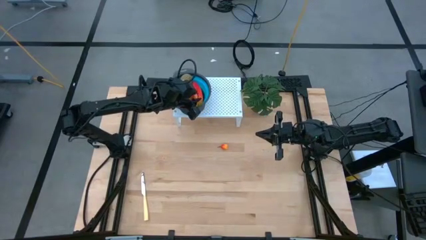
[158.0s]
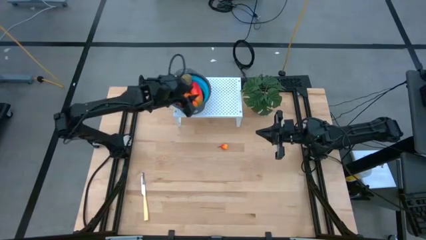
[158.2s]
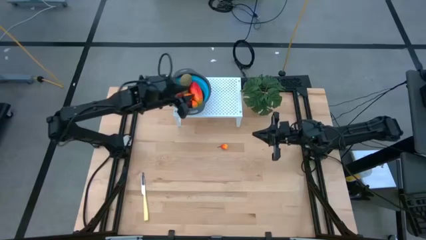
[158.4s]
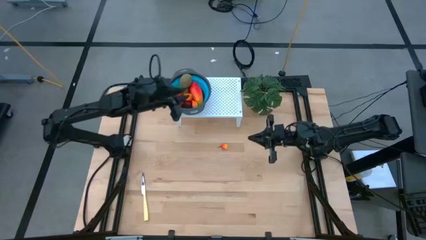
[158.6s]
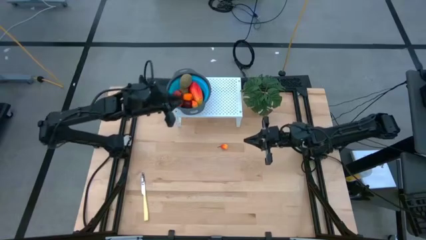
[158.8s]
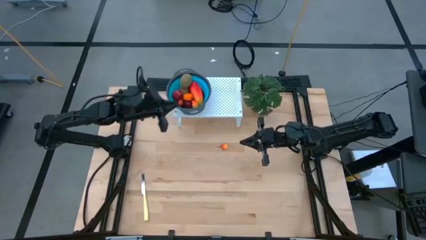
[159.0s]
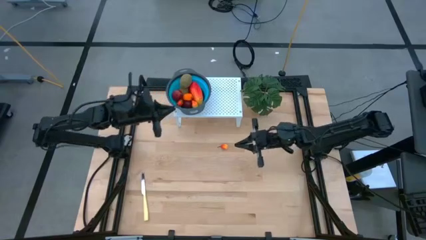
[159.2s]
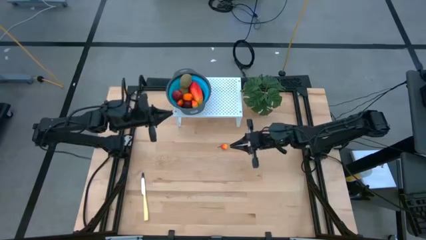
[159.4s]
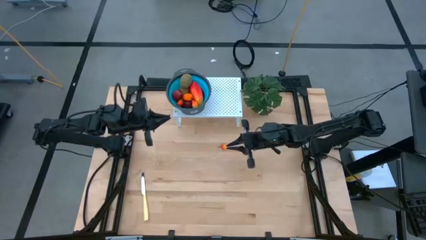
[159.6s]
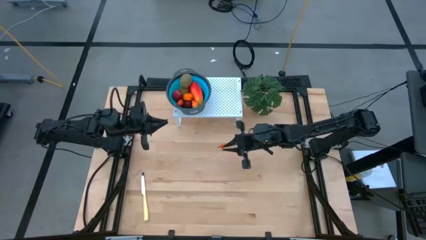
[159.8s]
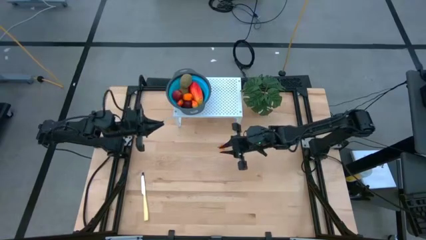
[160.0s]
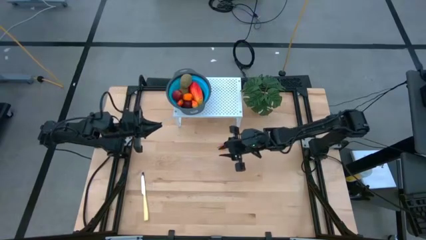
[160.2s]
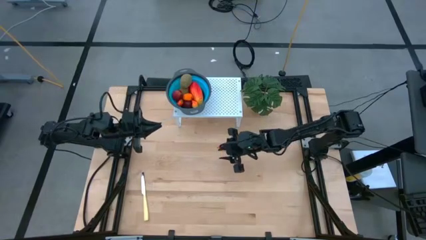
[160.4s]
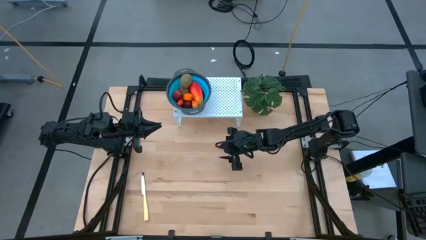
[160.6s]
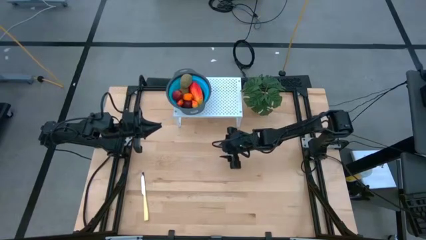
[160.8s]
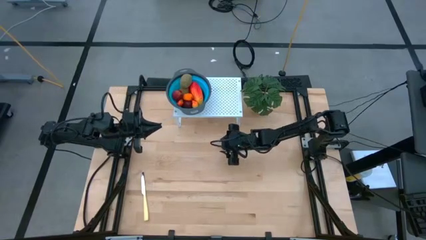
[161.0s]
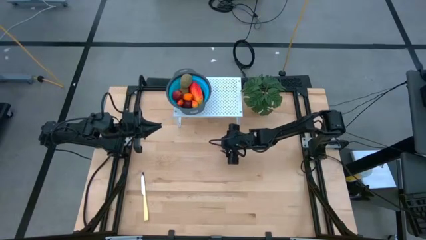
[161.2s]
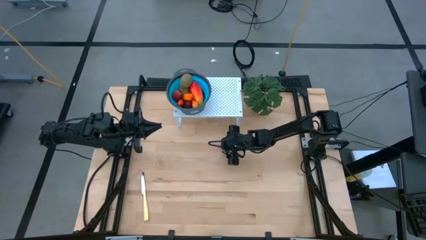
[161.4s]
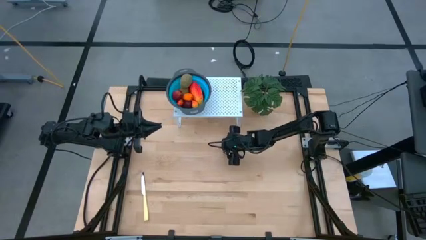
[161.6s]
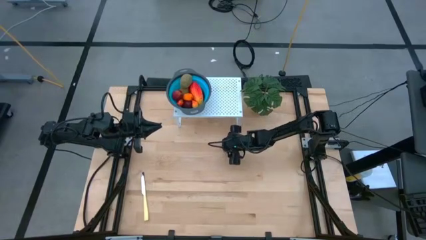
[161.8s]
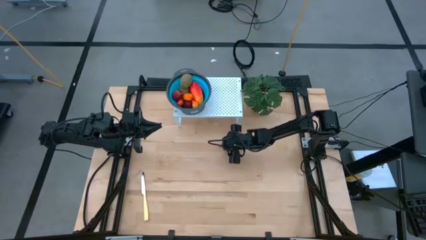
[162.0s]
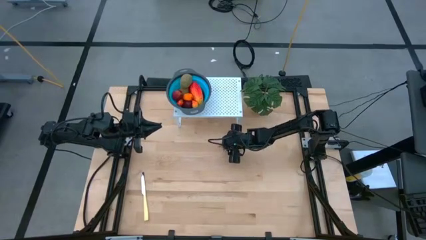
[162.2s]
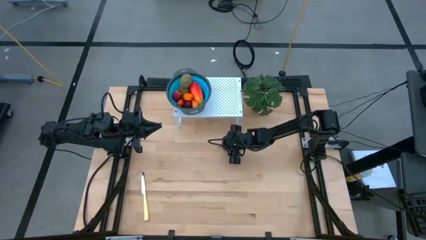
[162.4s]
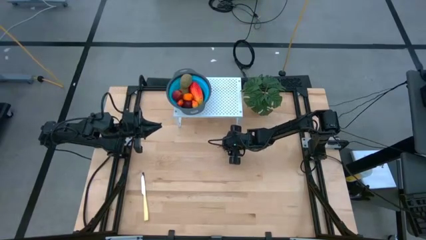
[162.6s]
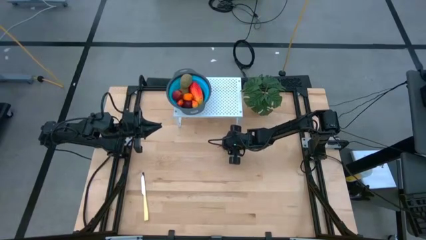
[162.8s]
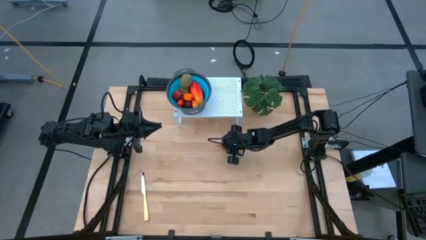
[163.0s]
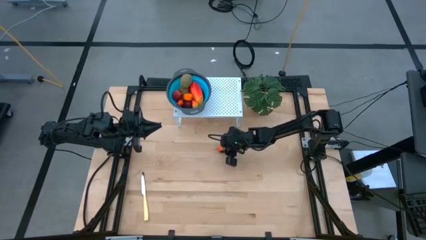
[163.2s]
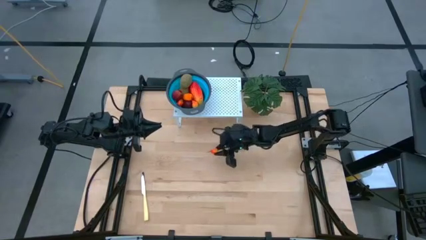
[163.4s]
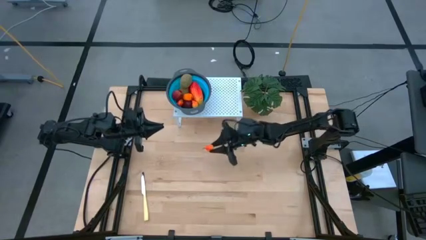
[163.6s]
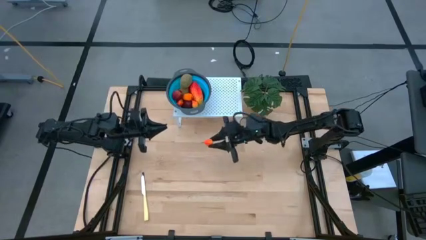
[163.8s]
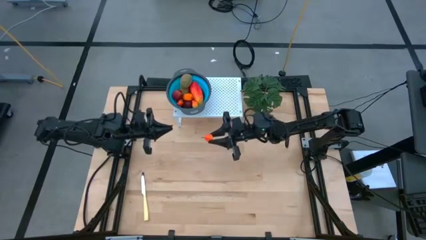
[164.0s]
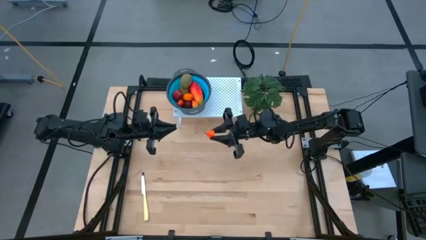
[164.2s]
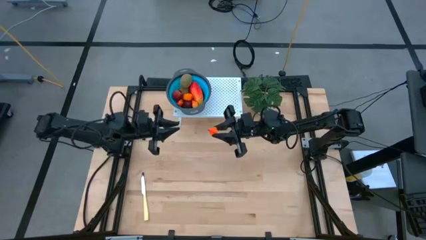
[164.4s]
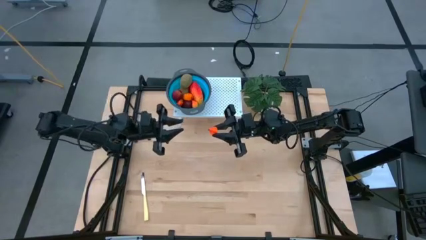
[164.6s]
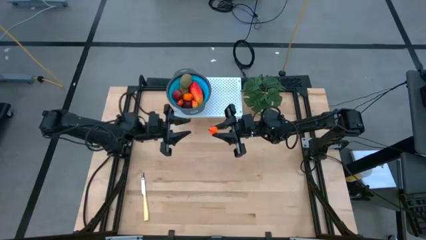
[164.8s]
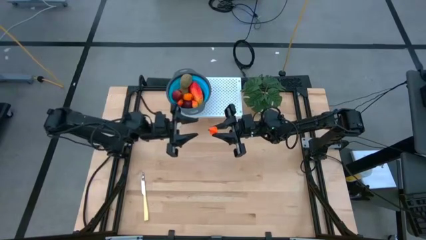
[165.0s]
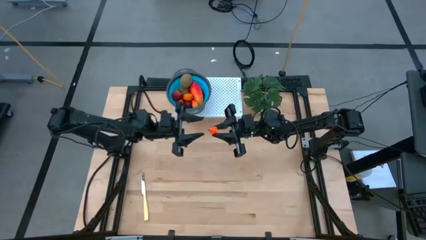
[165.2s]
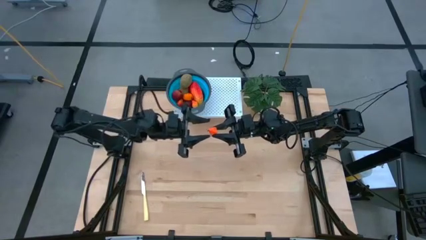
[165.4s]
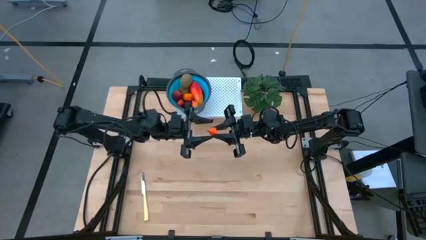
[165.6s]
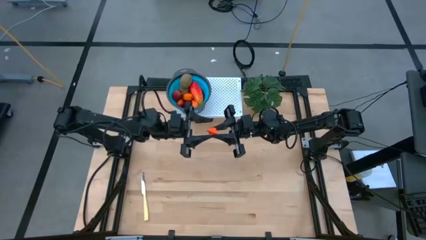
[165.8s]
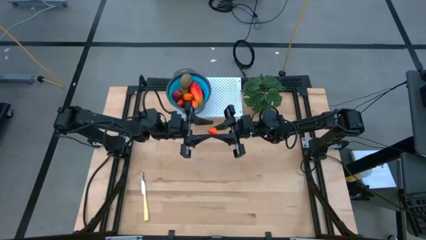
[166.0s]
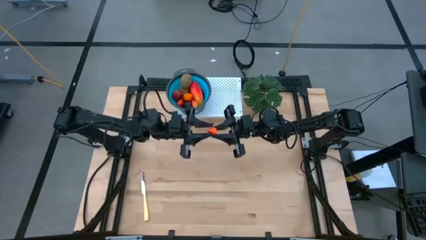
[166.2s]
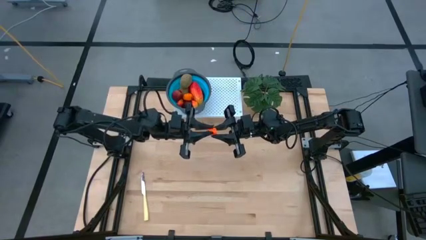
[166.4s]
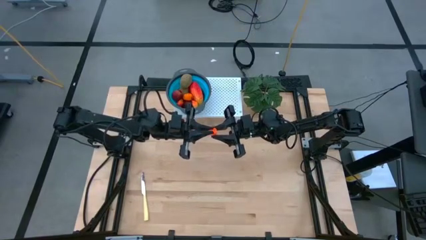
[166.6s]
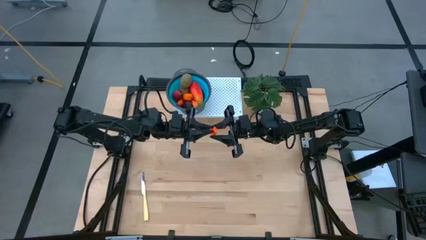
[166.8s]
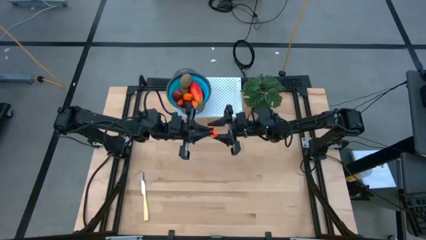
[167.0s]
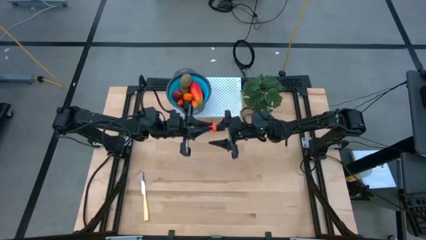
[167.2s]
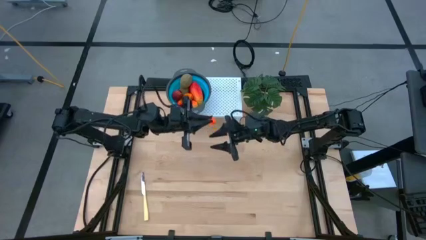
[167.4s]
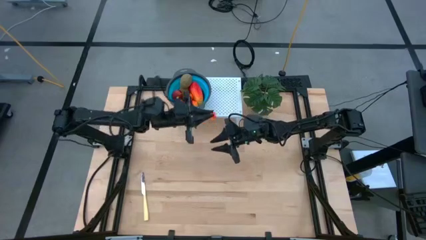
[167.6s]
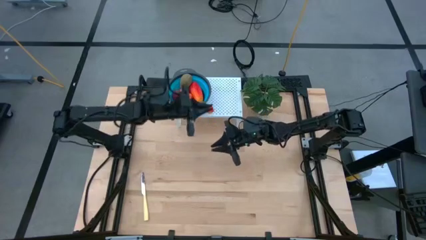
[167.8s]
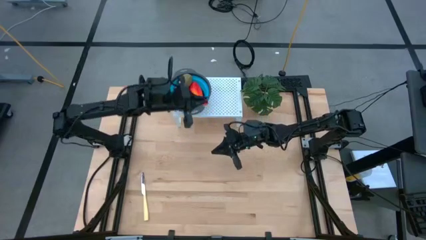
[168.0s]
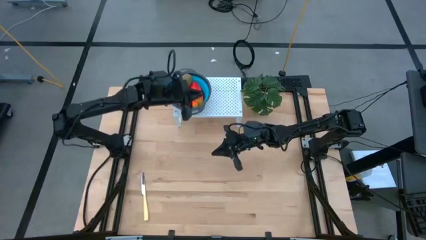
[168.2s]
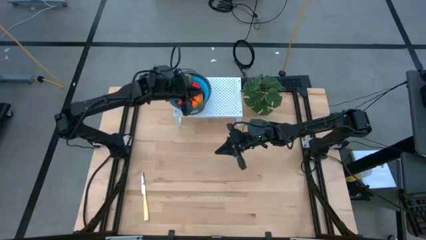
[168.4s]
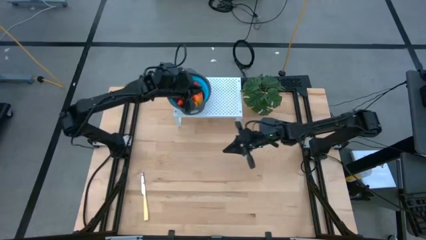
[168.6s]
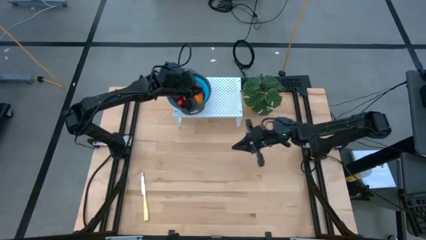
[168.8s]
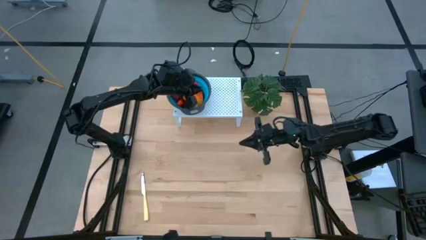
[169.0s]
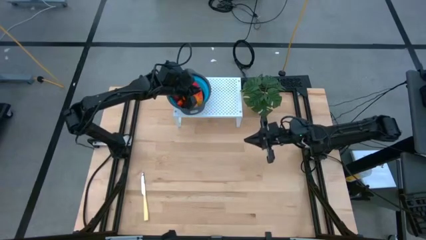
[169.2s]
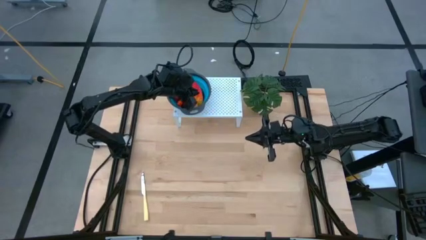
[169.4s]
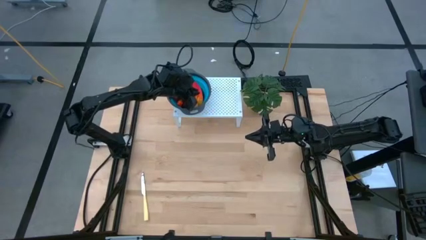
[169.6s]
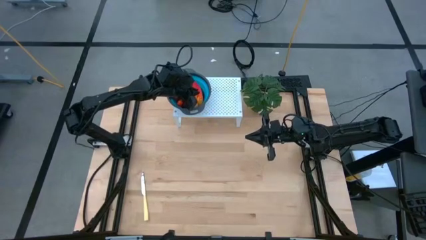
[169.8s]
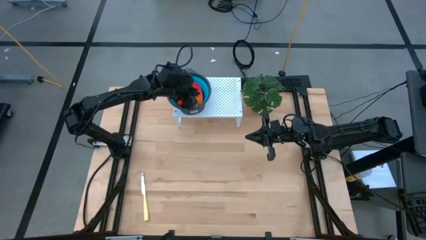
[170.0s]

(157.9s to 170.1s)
Task: Pick & Place Fruit
Put the peach in the blue strainer bowl on the shelf

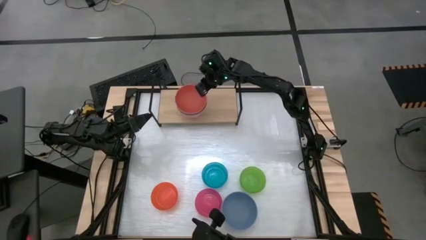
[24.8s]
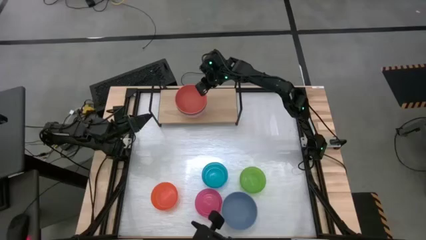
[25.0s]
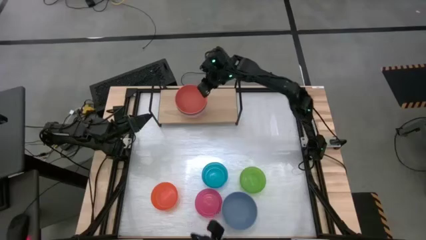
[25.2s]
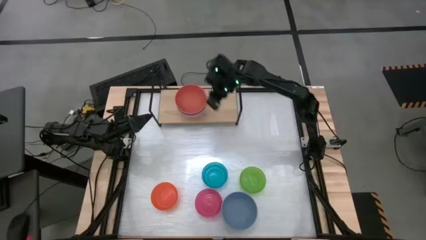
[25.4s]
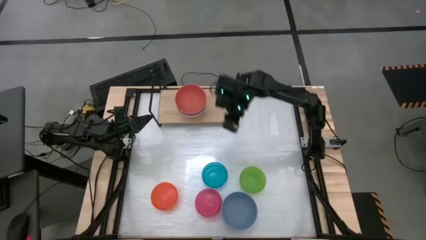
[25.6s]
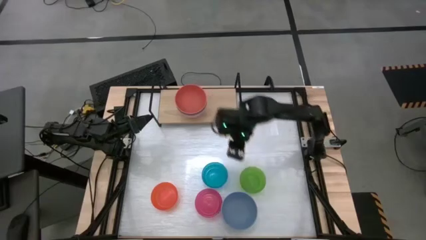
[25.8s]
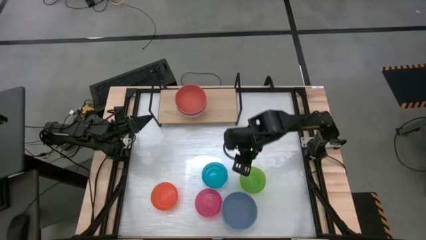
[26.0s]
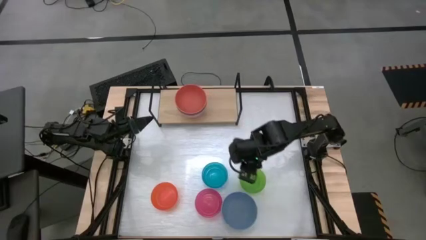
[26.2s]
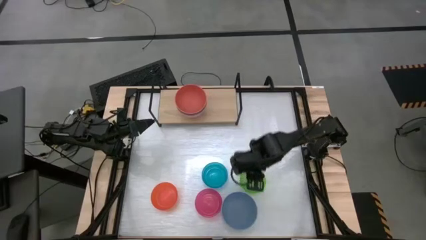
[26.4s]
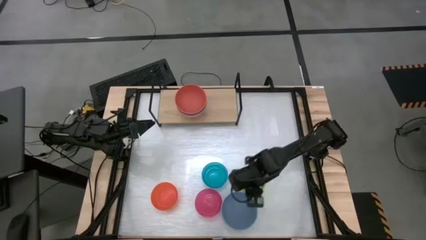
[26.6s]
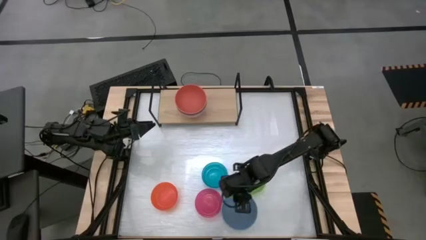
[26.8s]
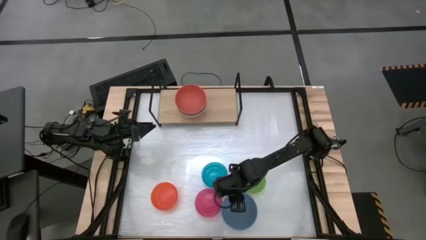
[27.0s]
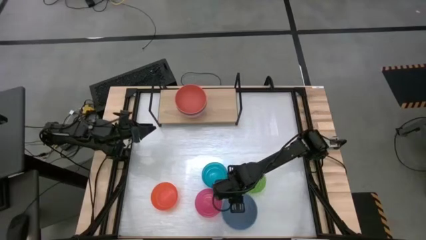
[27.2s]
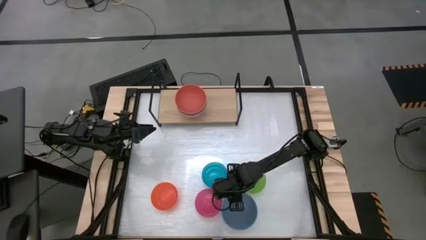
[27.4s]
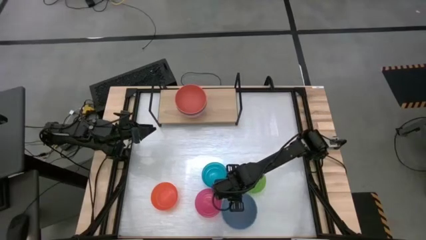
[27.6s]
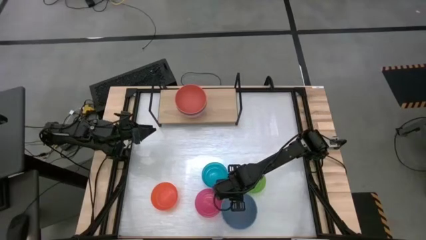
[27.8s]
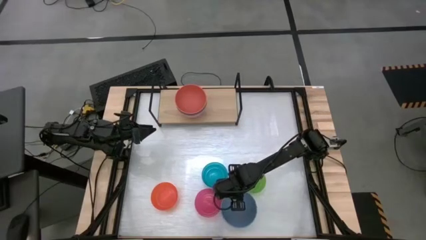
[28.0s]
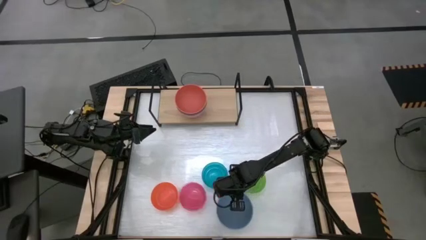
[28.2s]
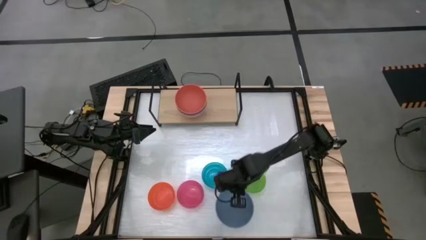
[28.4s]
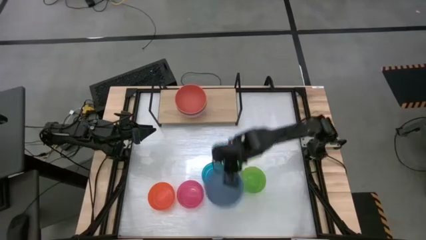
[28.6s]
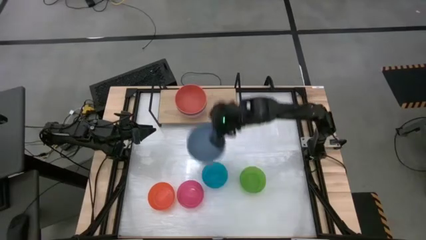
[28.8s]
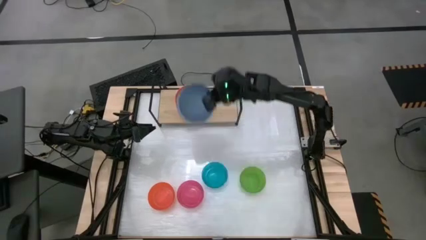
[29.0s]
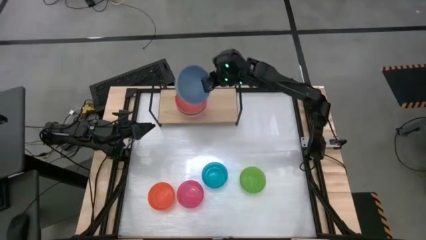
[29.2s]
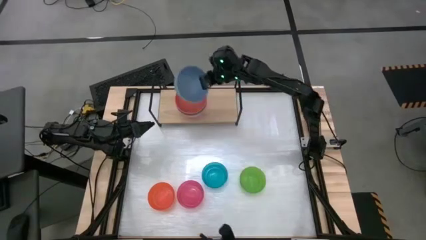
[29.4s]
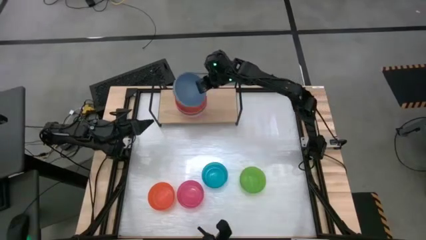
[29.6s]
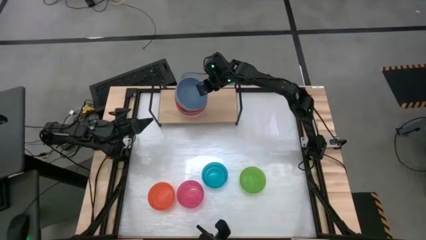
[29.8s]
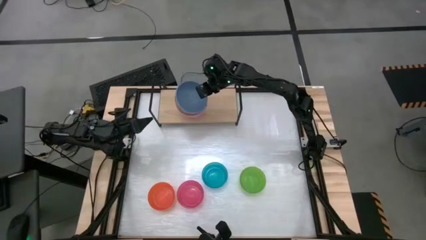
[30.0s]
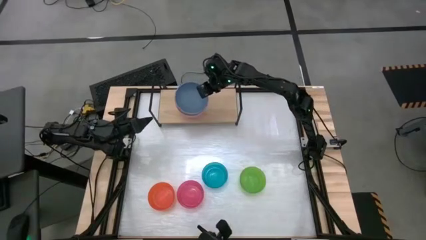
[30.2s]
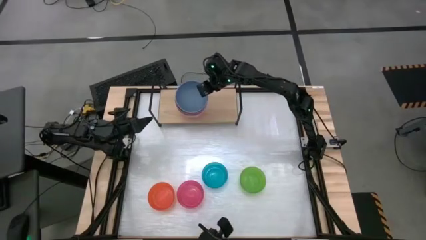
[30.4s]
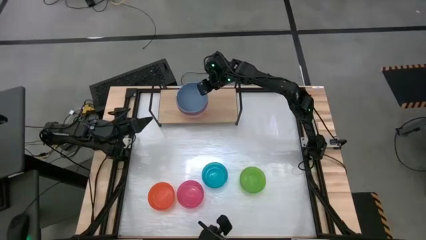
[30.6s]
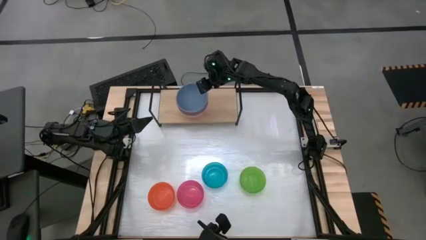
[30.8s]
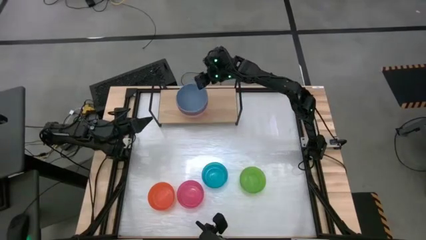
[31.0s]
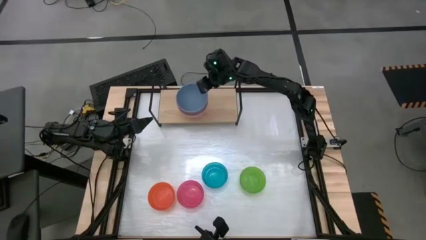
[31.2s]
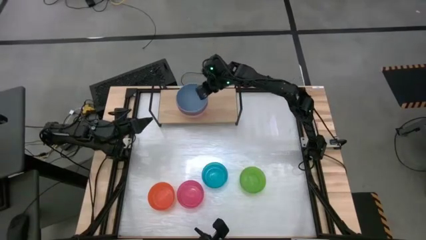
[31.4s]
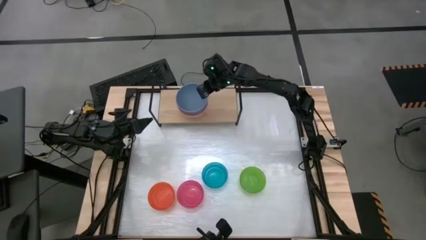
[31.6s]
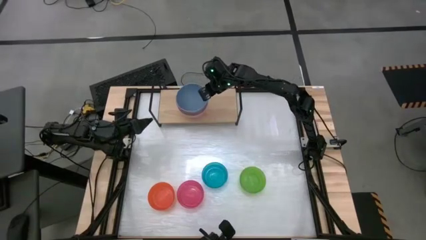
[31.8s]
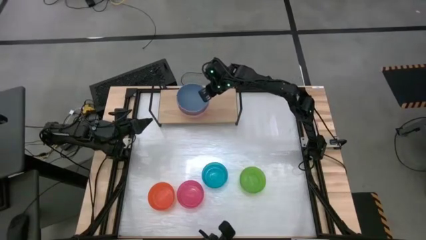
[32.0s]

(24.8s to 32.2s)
Task: Place and stack bowls onto a shelf
Stack the blue bowl on top of the orange bowl on the shelf
